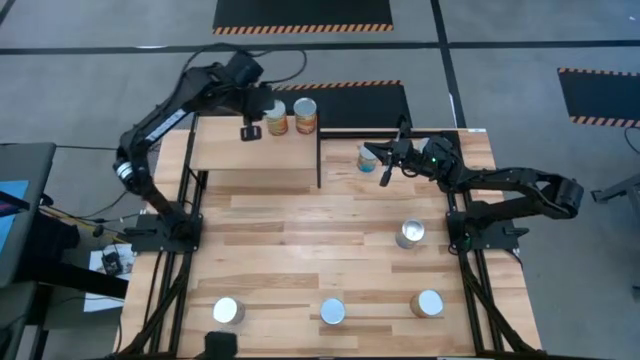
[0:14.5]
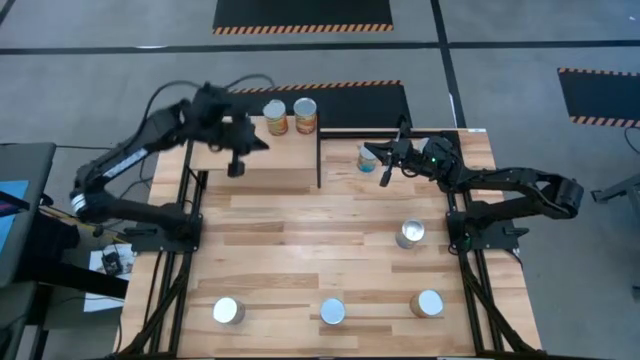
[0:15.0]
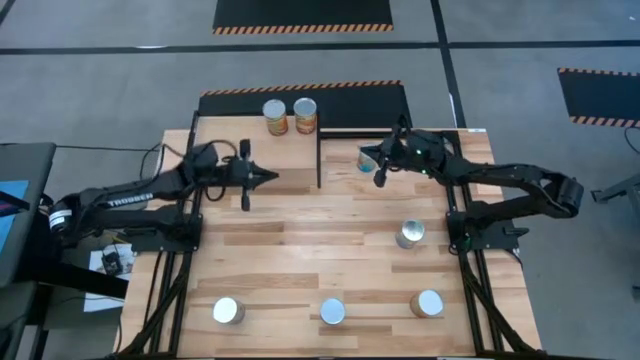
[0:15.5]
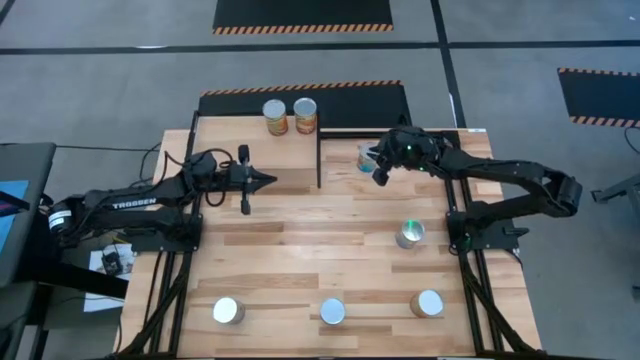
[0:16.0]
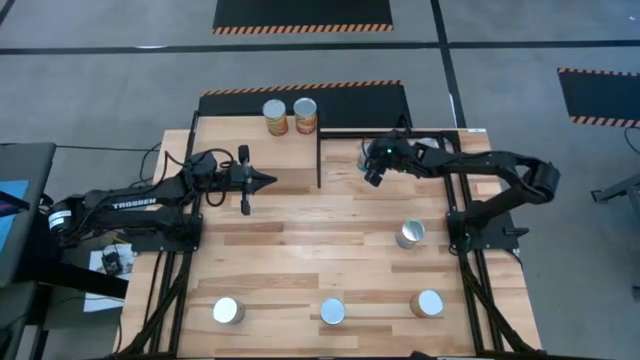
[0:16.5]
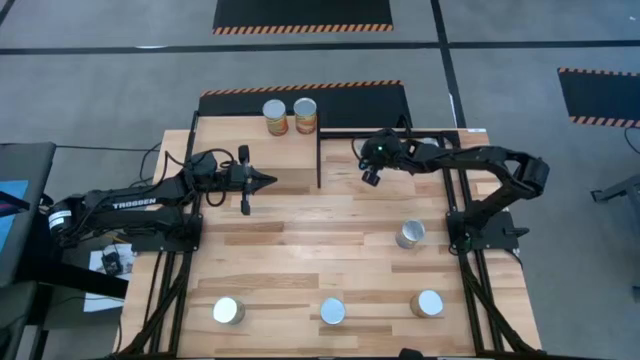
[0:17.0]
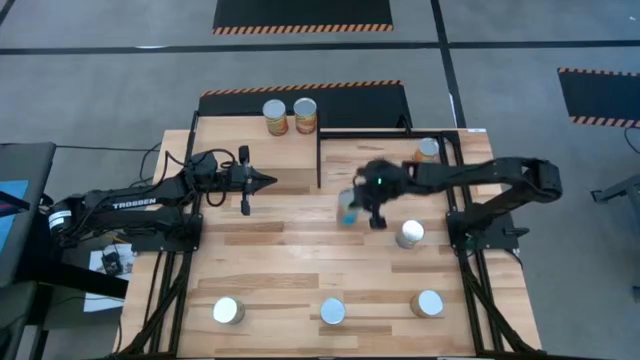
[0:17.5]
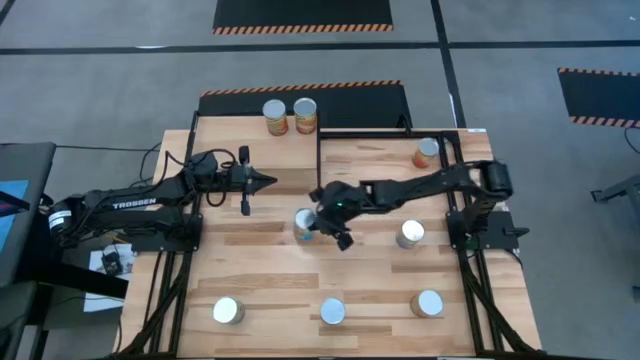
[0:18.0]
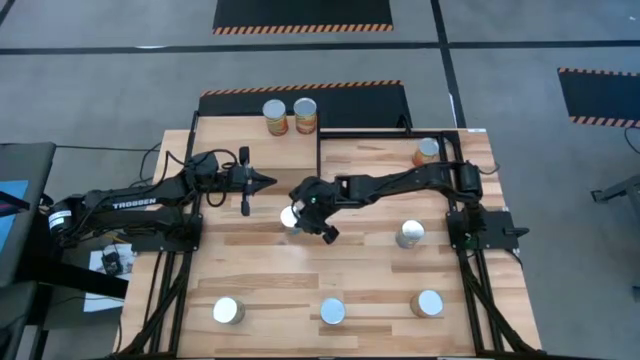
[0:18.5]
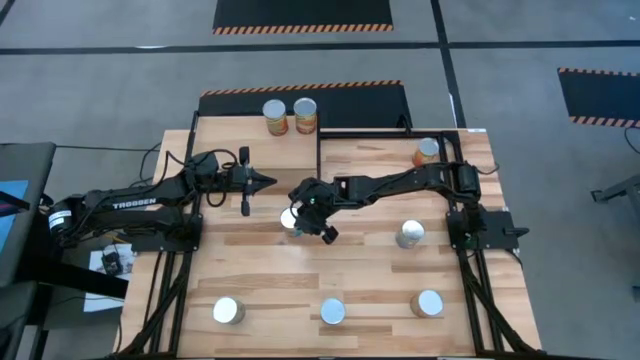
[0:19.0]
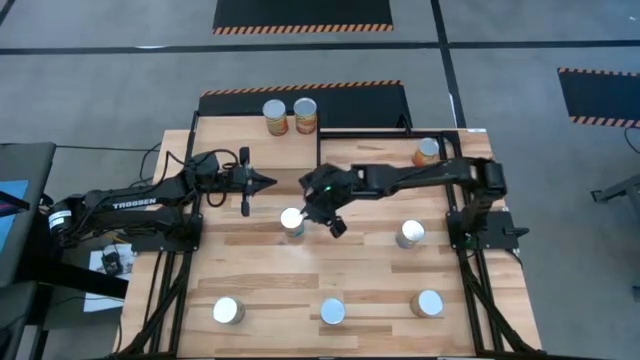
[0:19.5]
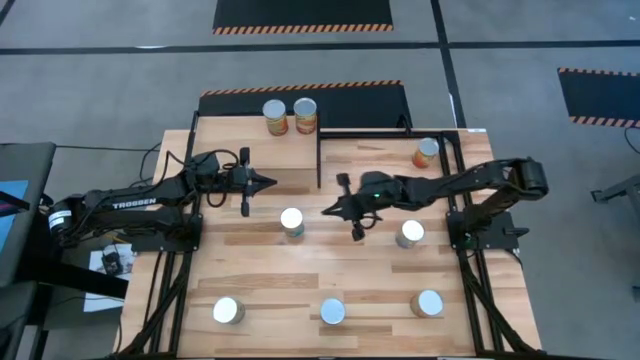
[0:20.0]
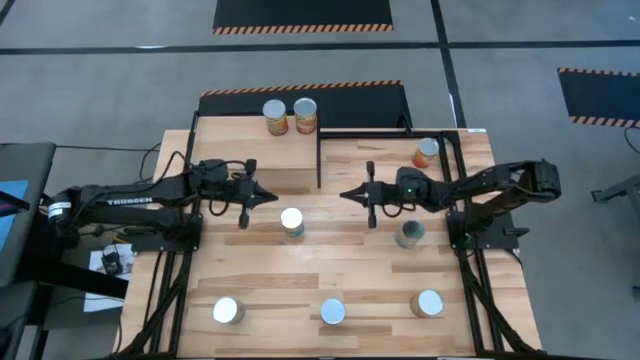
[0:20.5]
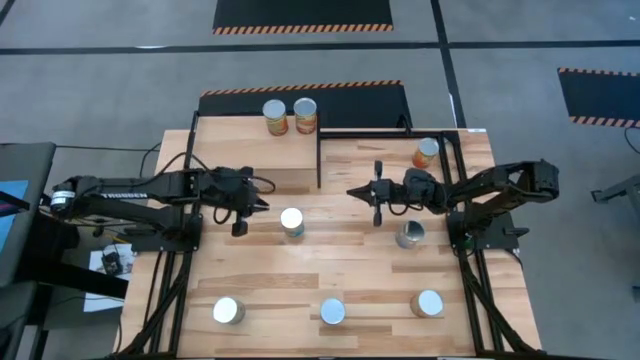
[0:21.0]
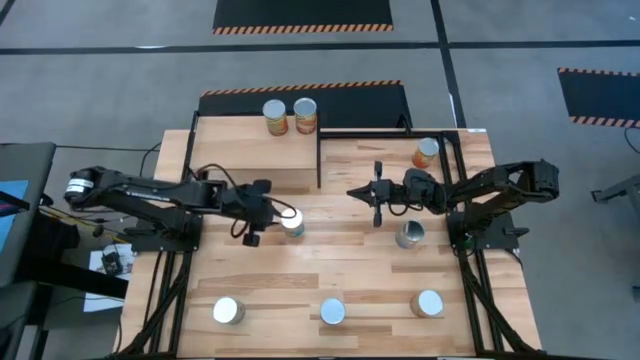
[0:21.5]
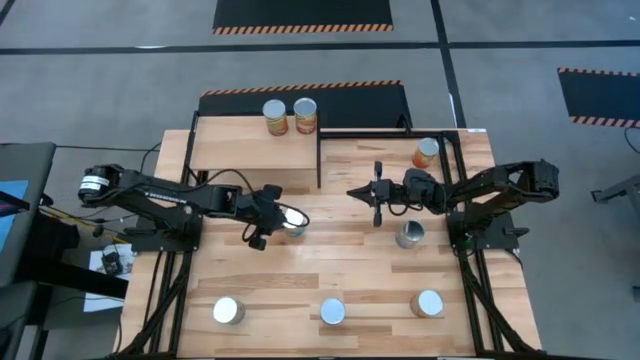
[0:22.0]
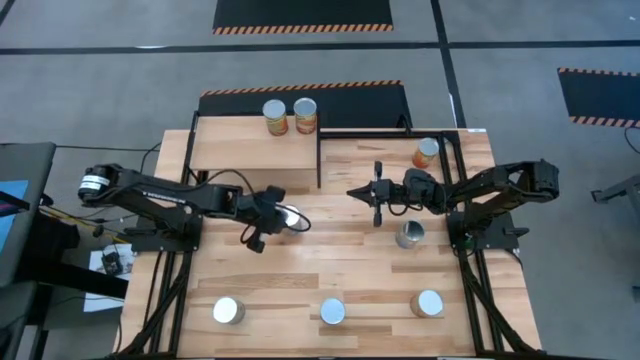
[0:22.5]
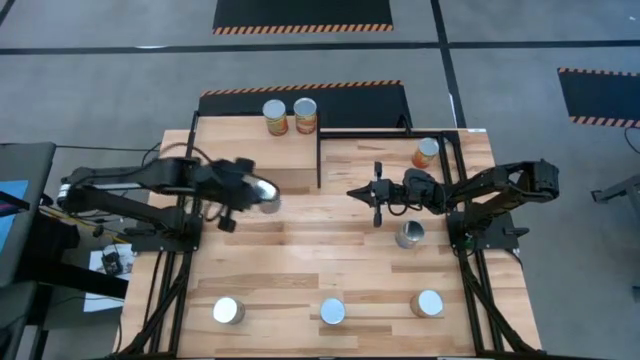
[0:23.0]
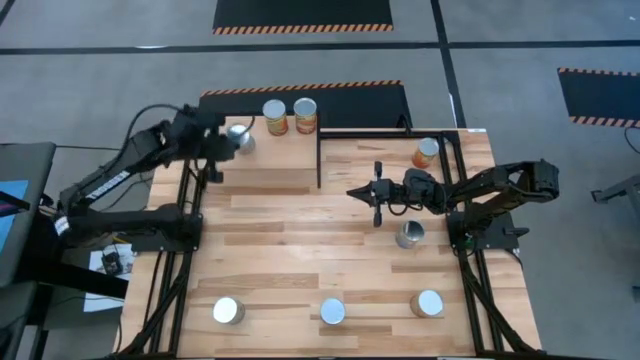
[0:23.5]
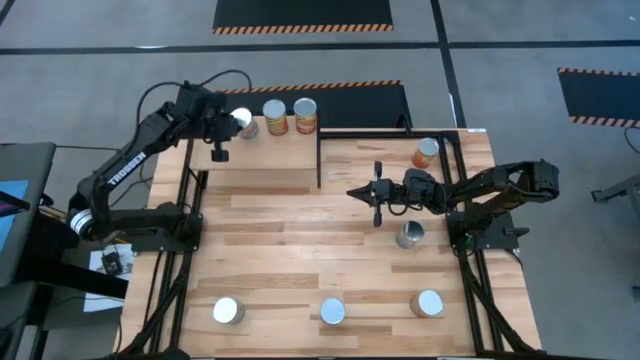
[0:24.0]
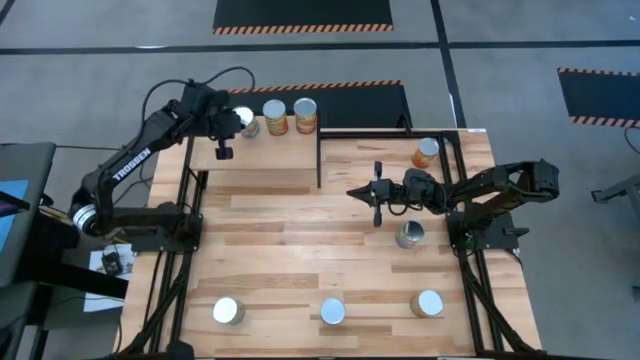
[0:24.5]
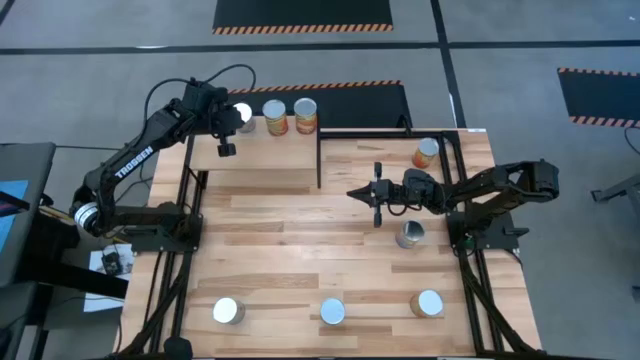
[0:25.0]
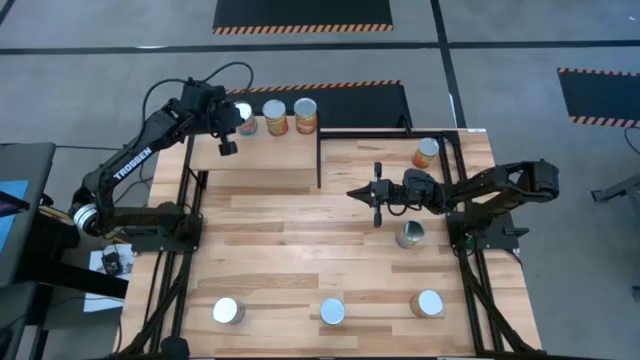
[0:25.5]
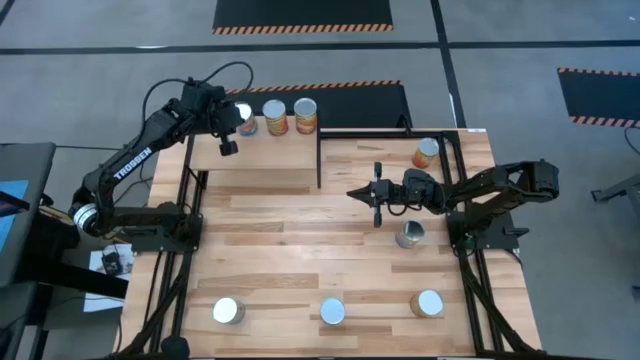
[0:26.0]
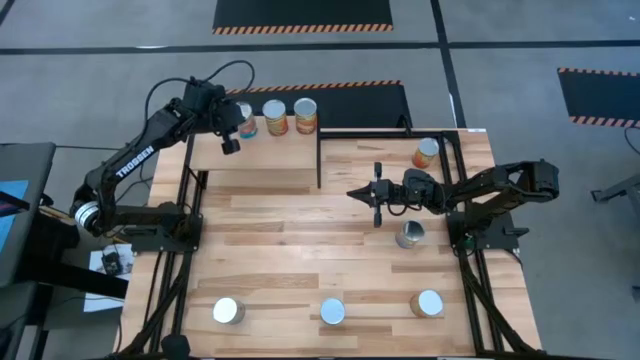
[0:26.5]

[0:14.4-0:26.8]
Task: Pick and place cans onto a shelf
Put the top canned tomatoes on the shelf

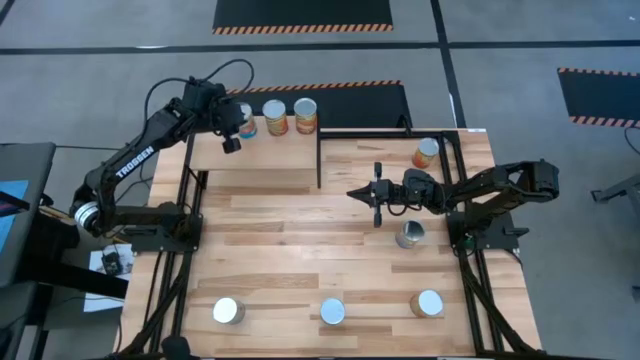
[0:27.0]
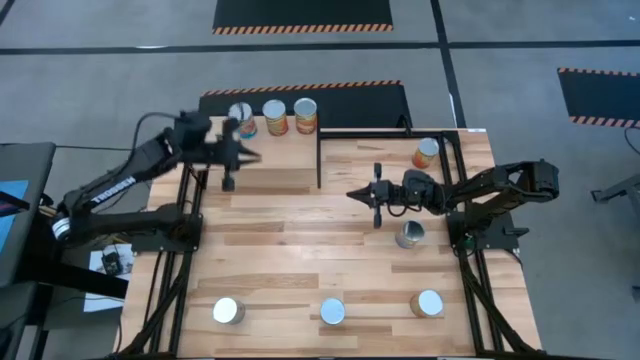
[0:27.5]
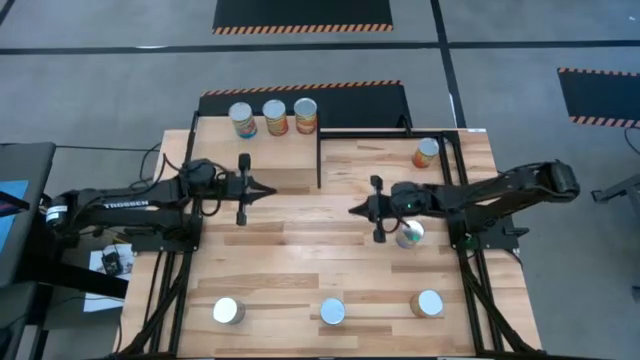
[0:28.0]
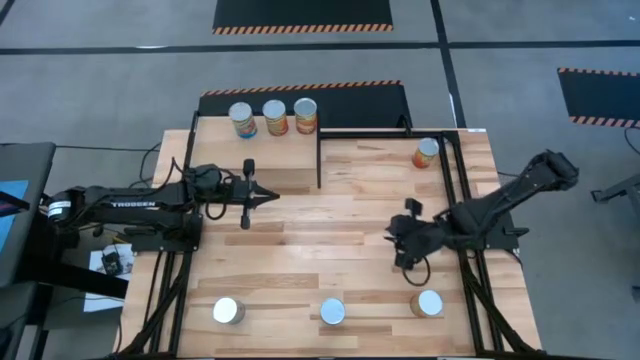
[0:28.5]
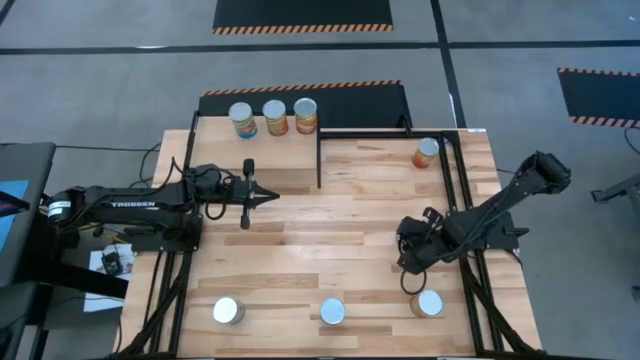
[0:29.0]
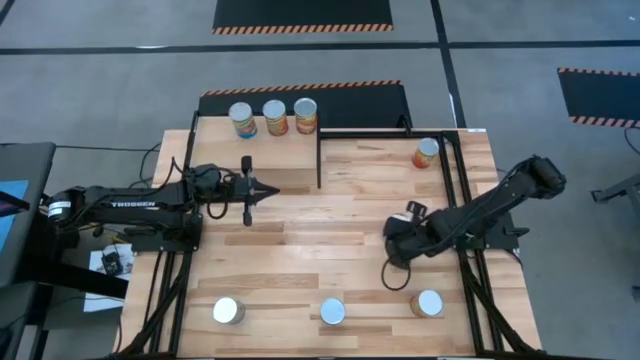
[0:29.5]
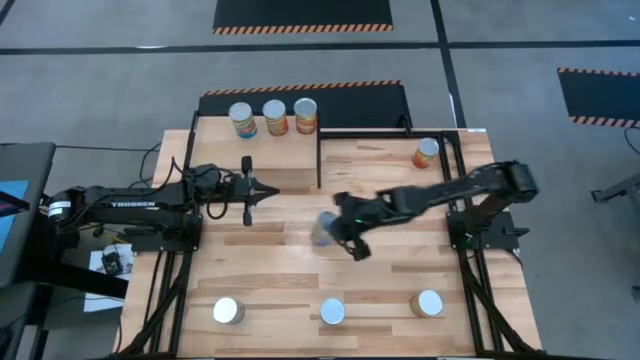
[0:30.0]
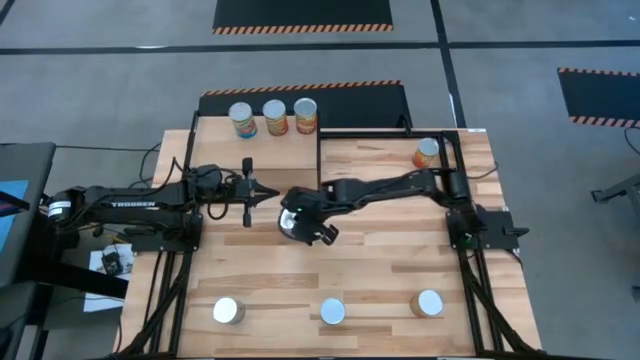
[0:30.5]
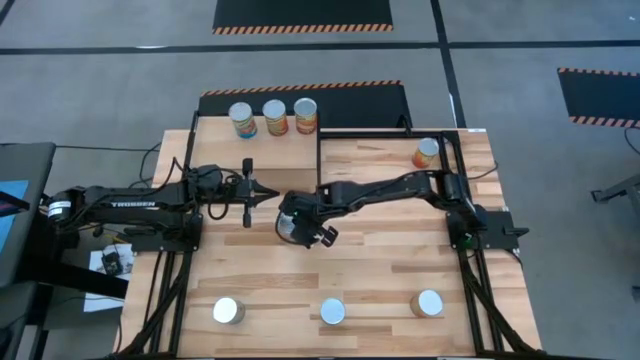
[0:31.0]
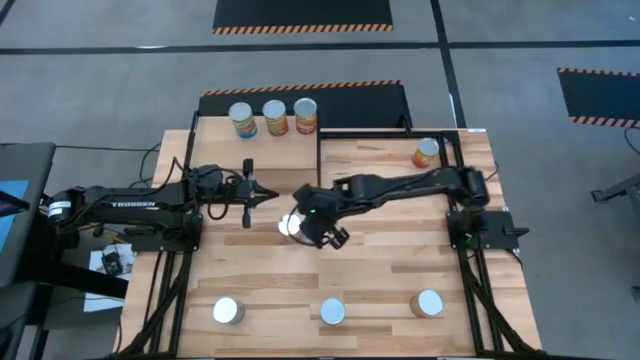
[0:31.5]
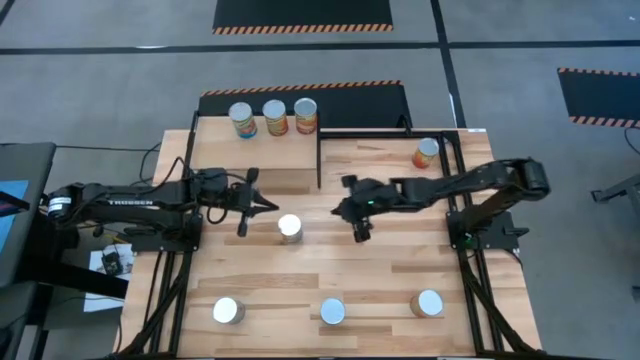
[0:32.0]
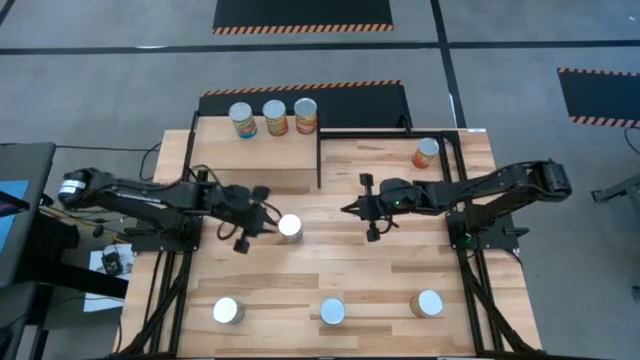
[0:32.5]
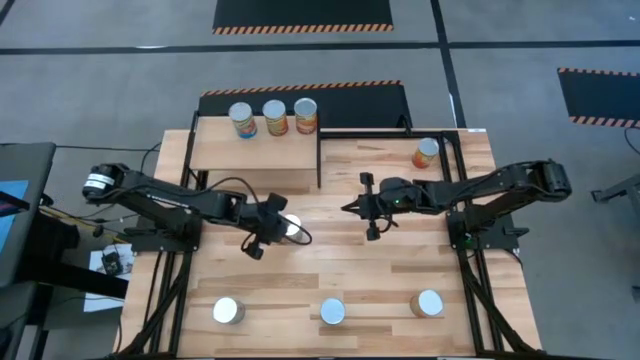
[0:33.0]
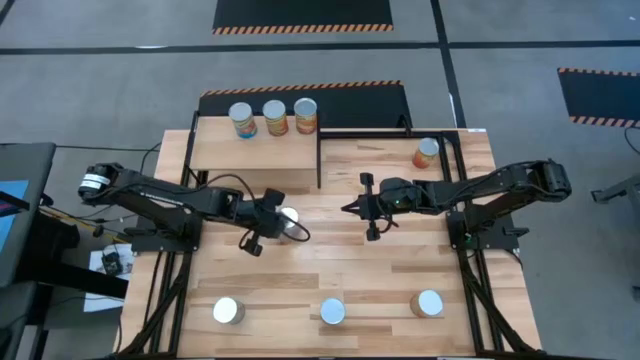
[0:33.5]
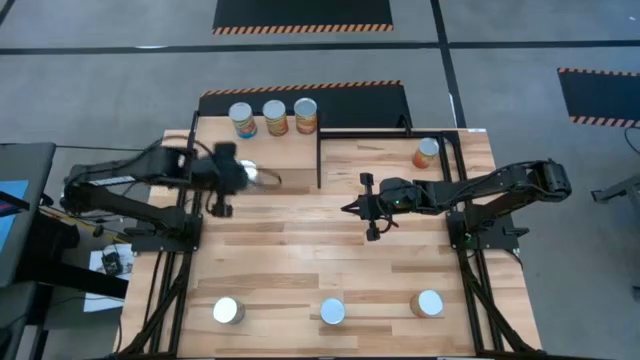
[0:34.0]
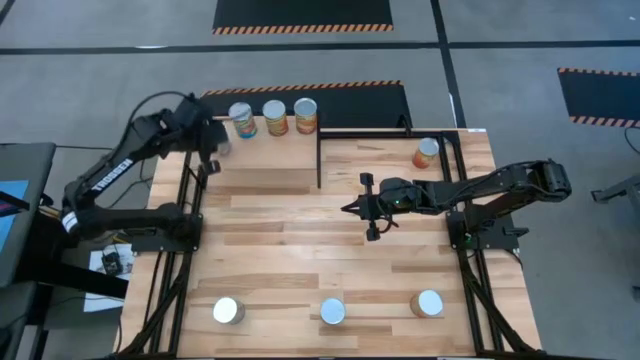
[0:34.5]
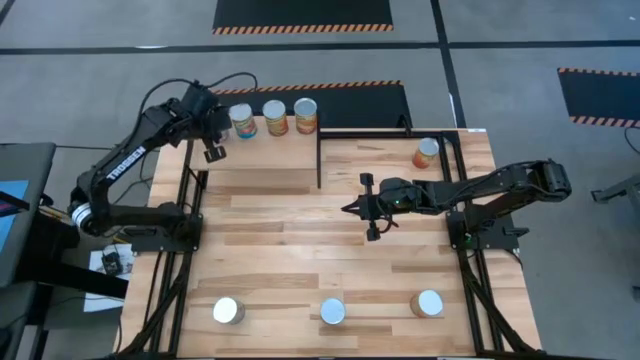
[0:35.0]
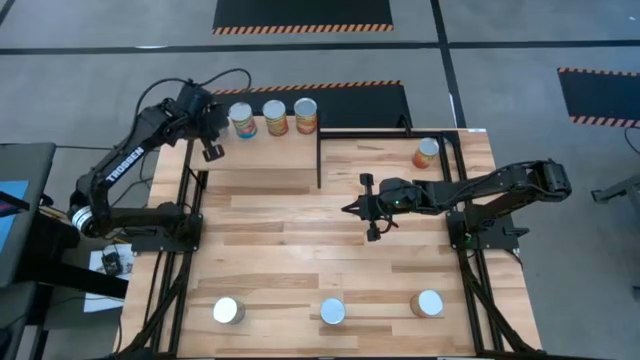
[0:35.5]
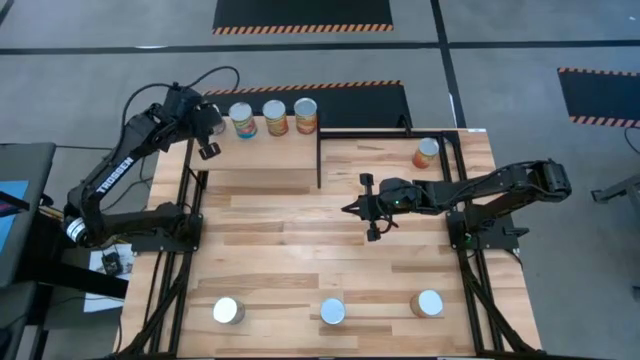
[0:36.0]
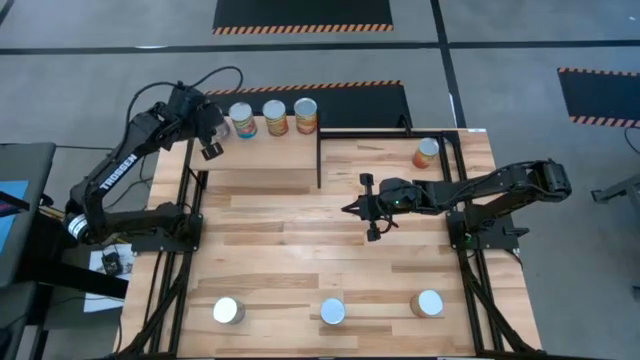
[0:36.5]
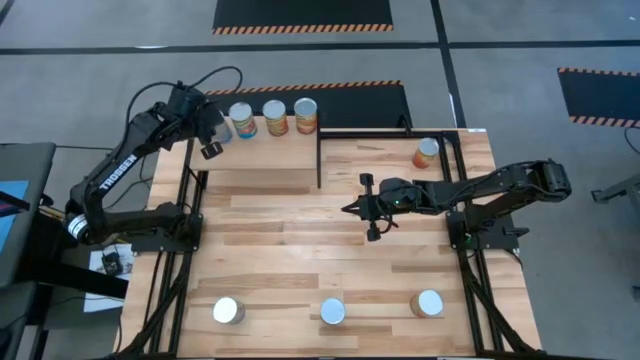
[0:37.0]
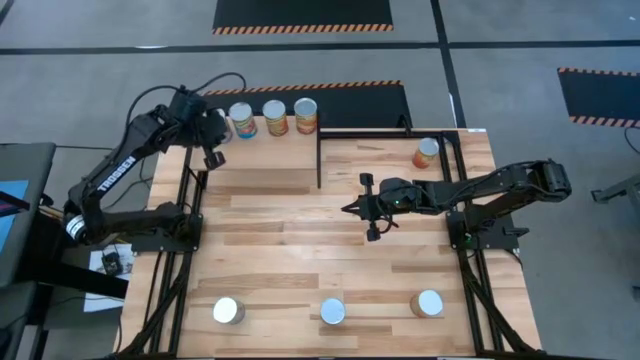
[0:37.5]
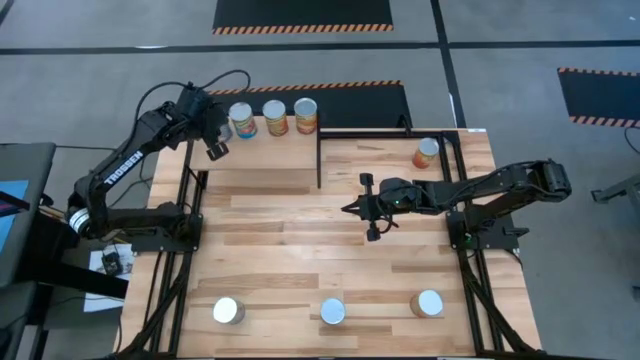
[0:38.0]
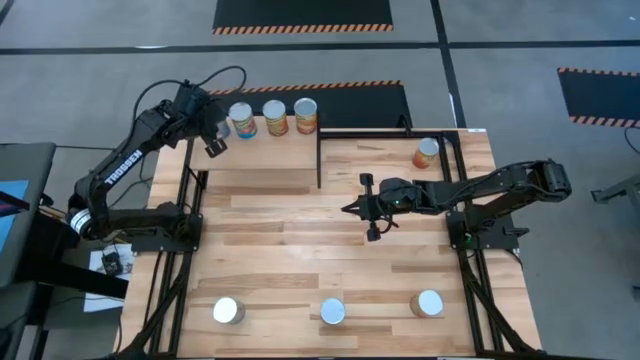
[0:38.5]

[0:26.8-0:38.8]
Put the right canned peaches on the shelf
